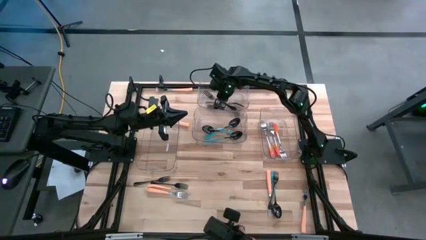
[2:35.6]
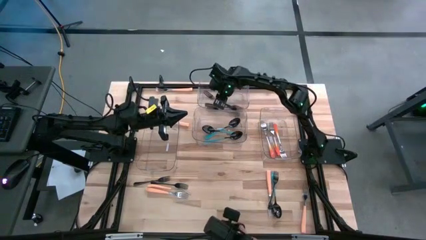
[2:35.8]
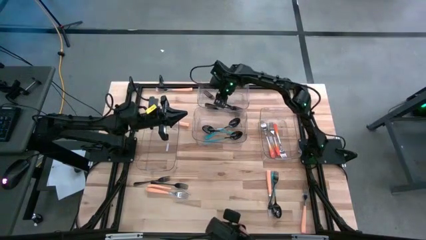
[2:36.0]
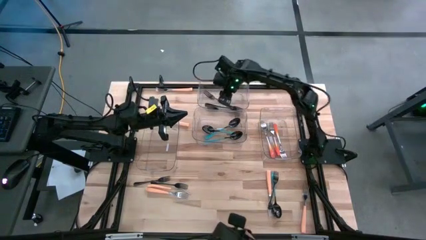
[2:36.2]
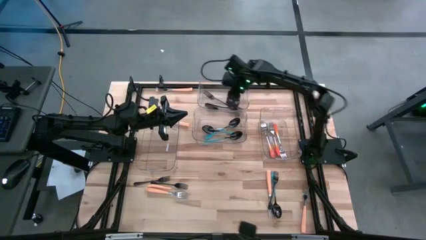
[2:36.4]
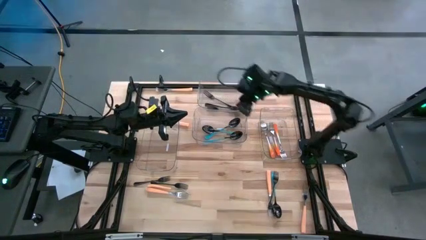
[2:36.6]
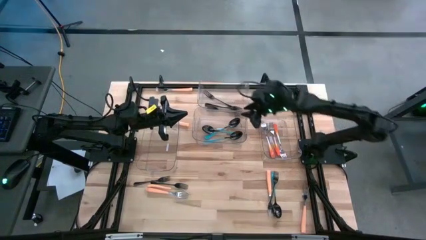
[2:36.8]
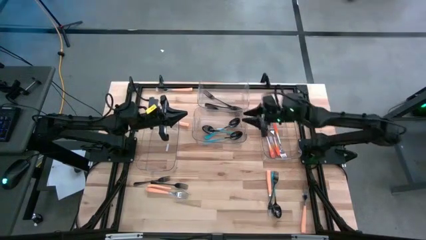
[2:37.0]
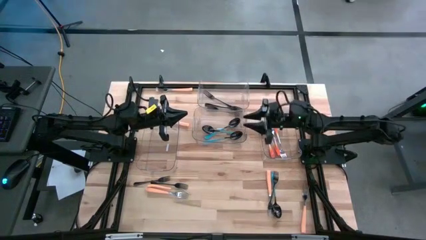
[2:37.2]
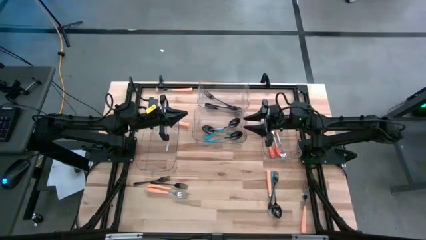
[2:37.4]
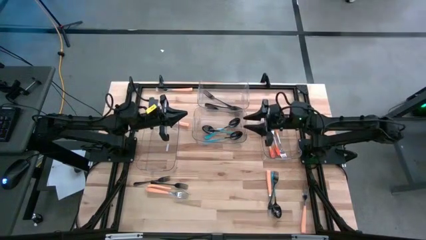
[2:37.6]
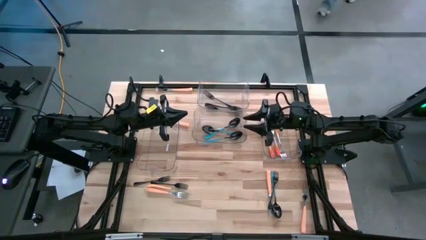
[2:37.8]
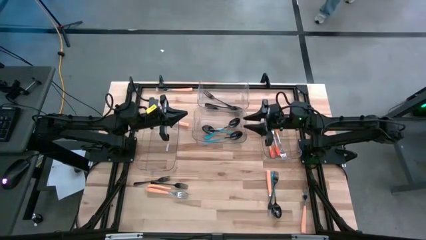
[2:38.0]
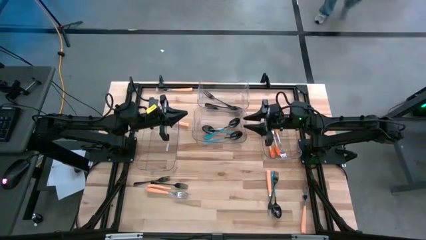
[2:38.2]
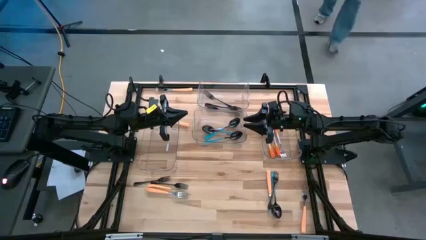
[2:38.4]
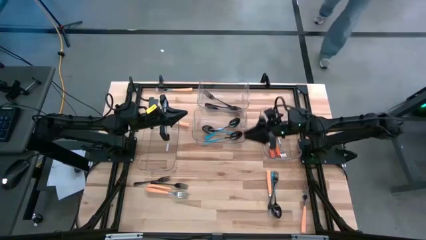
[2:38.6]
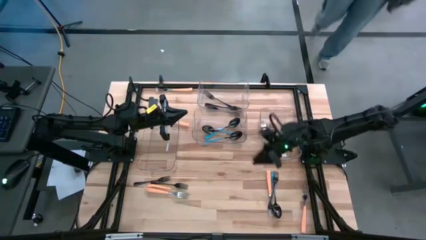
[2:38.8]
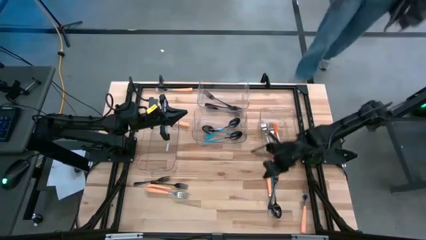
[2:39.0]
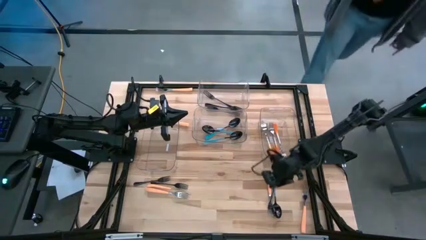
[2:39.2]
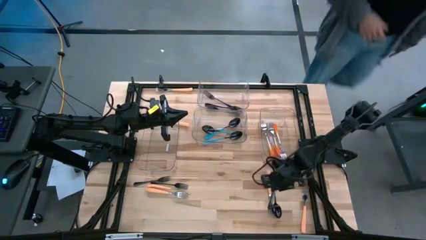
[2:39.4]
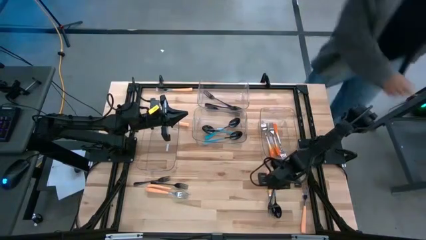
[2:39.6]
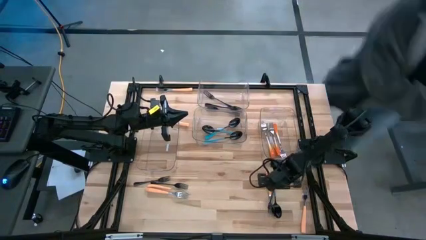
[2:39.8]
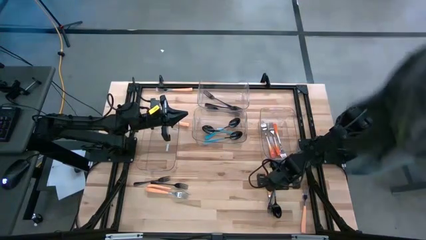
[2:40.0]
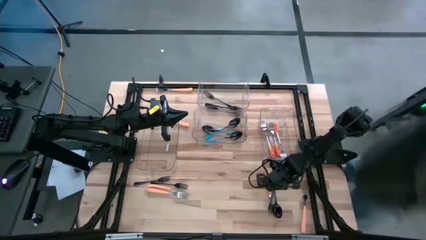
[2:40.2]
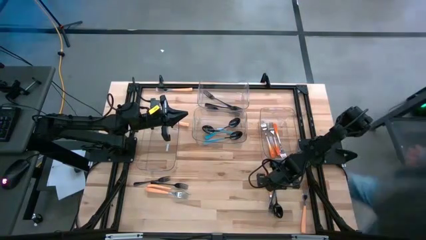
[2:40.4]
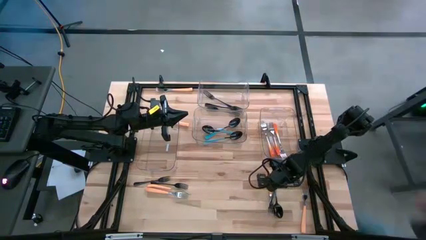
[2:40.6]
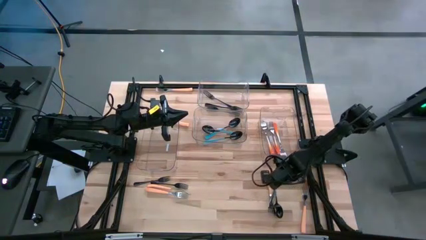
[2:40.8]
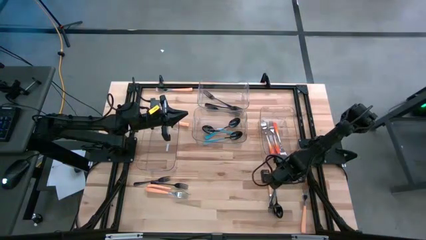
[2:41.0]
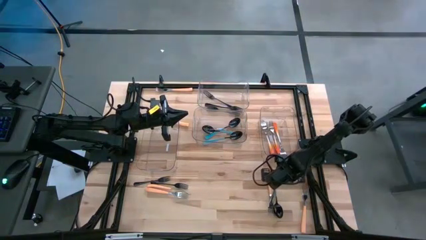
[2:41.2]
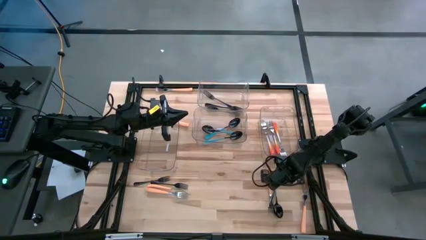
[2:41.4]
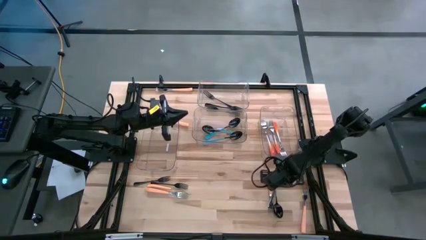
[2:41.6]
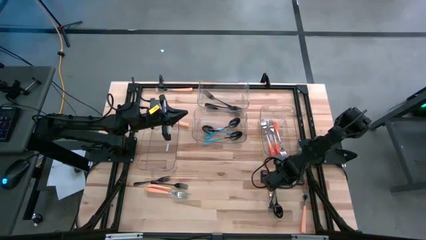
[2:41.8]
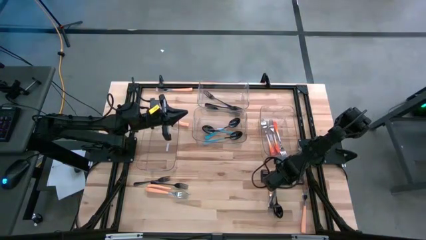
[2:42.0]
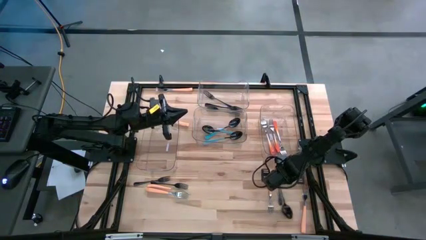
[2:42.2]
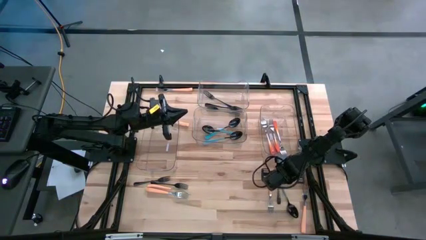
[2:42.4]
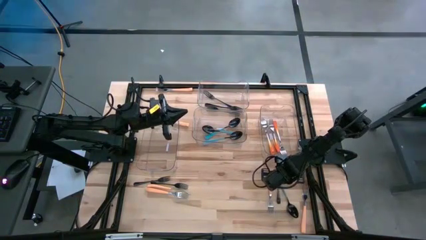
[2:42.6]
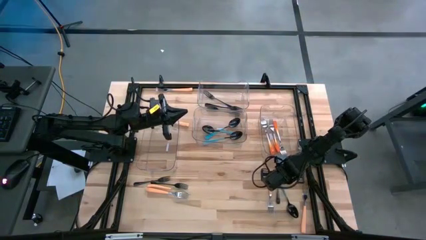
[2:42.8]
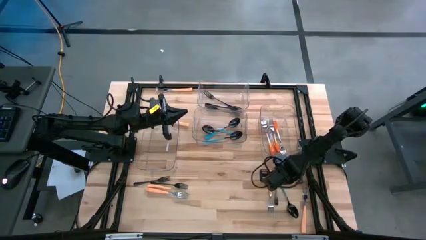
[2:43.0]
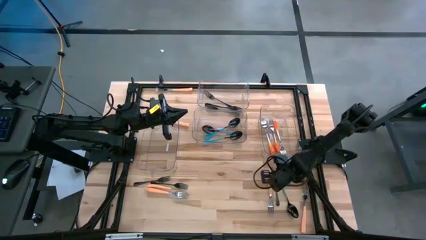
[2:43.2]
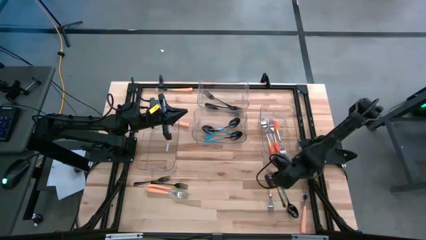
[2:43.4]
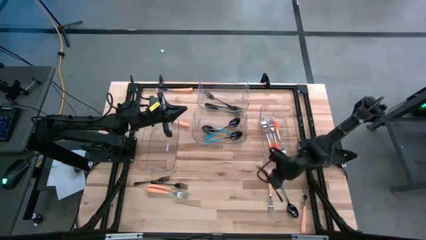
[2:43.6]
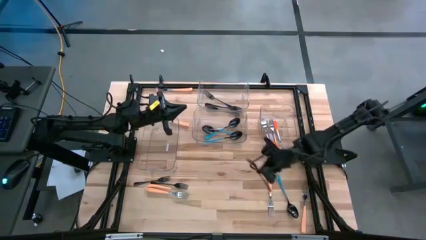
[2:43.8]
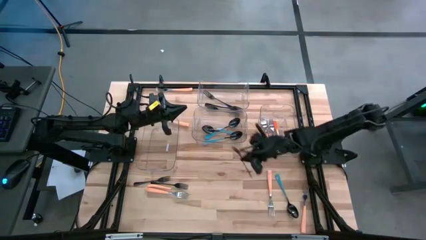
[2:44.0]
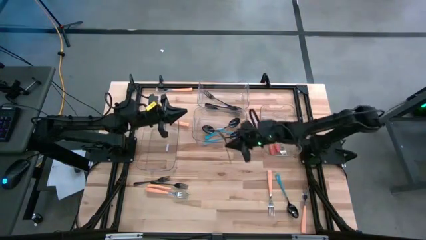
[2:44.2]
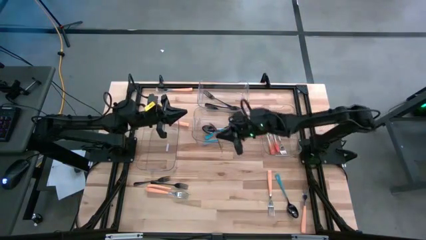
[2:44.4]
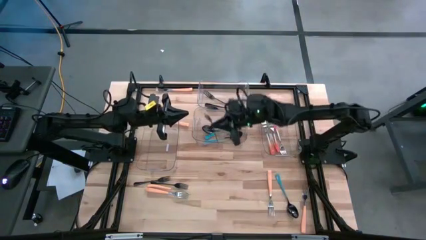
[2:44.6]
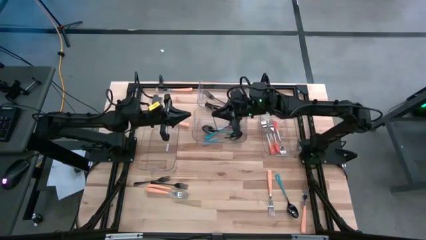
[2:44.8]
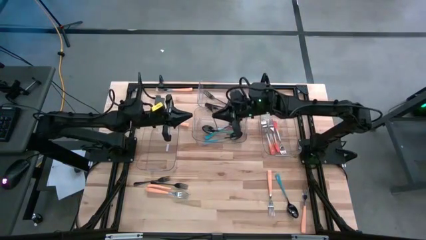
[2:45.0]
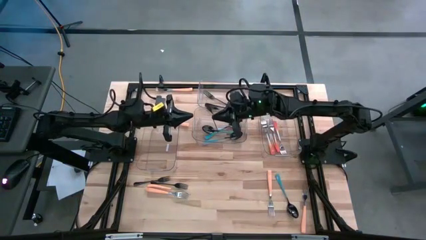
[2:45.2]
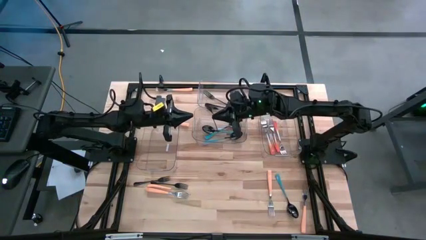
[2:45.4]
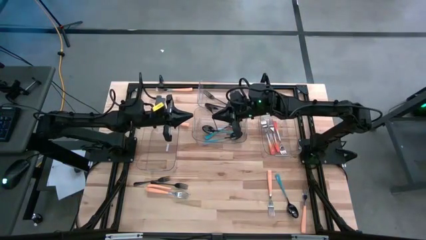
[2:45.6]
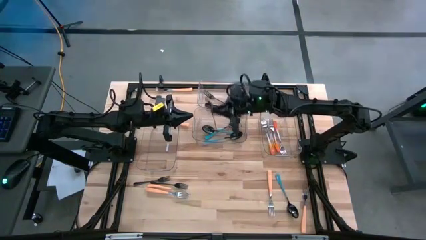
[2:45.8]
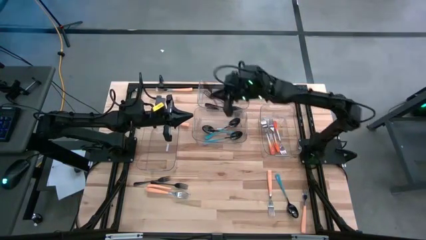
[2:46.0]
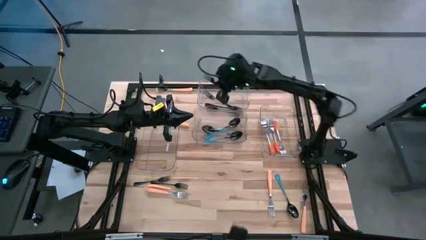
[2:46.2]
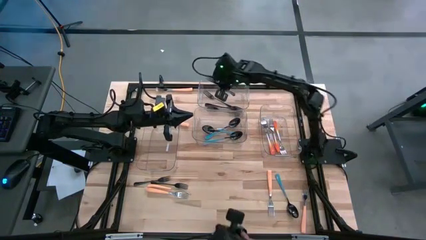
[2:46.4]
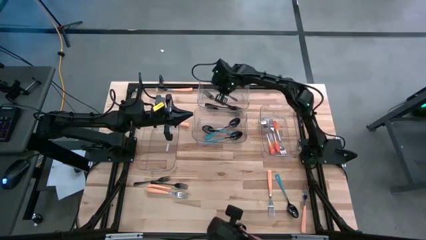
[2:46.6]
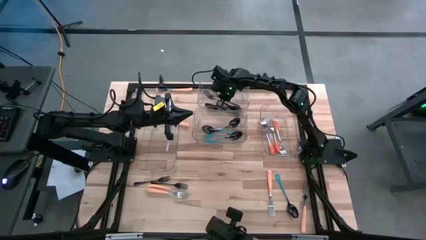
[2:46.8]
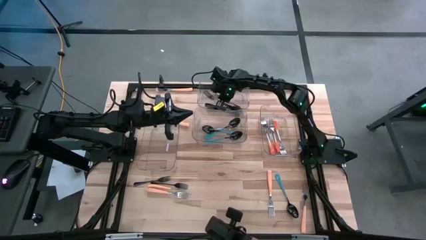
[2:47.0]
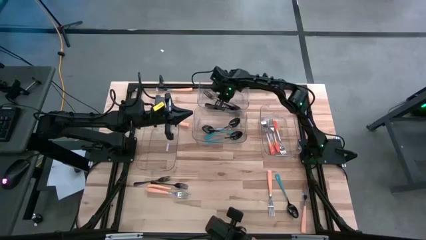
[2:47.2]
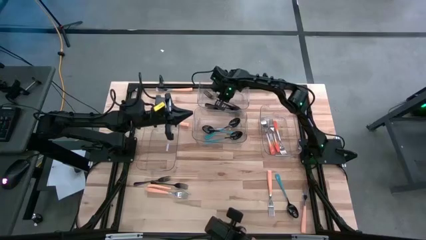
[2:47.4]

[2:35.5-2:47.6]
Task: Sort silverware by color (type)
Put the black fork into the top transparent bin
